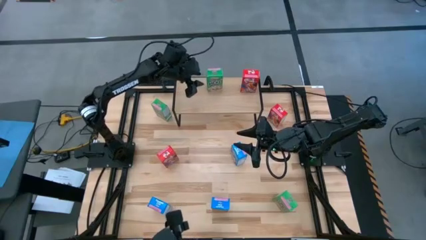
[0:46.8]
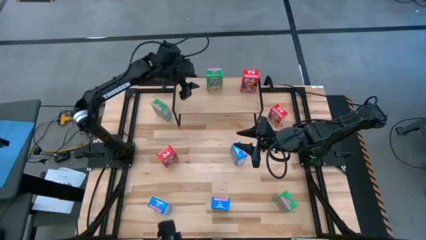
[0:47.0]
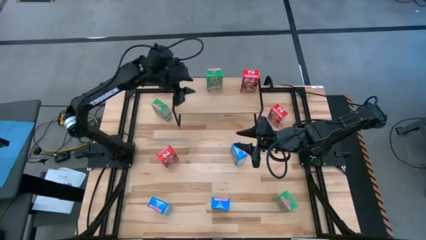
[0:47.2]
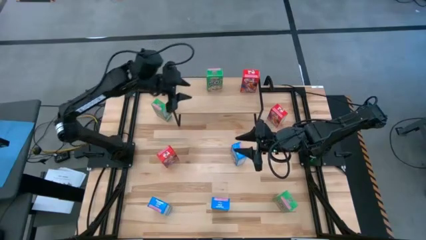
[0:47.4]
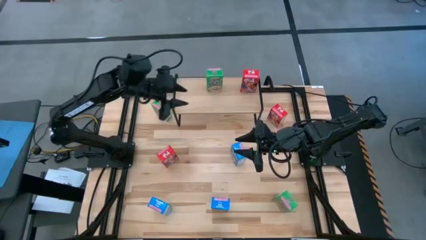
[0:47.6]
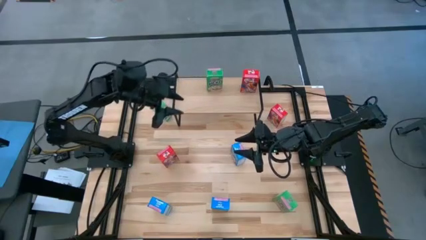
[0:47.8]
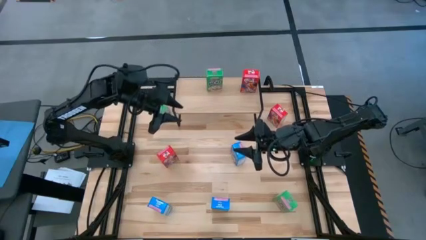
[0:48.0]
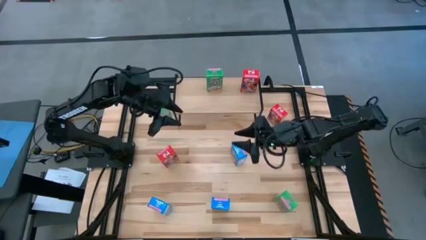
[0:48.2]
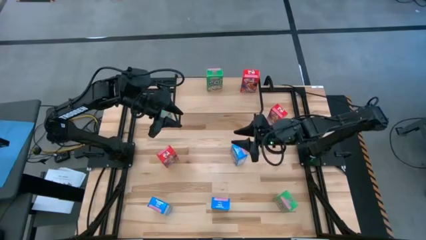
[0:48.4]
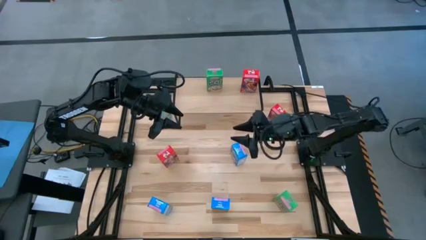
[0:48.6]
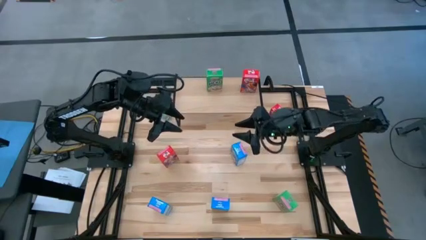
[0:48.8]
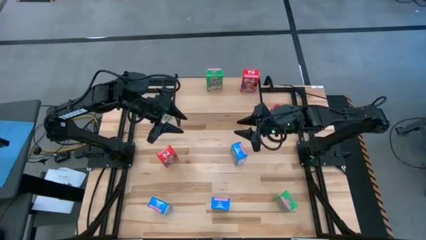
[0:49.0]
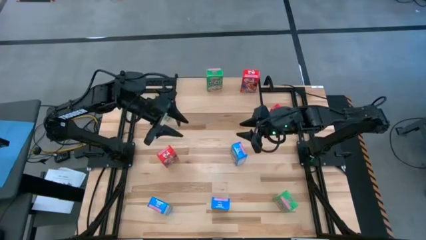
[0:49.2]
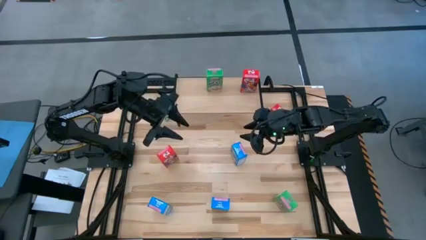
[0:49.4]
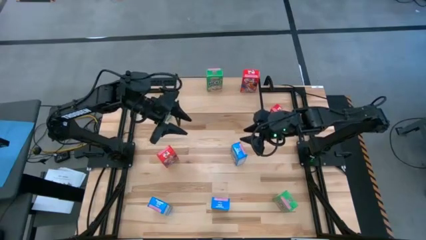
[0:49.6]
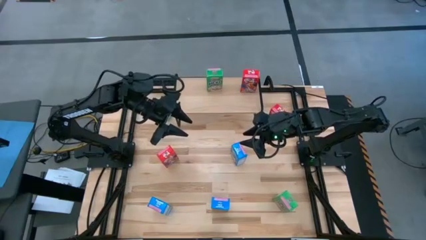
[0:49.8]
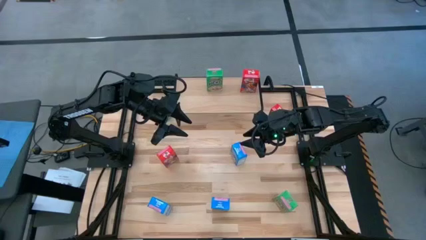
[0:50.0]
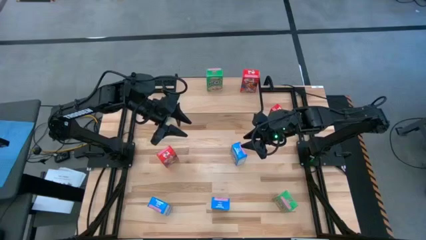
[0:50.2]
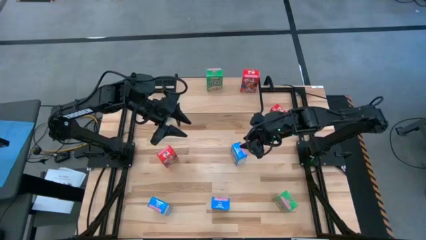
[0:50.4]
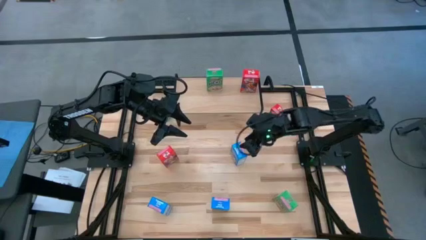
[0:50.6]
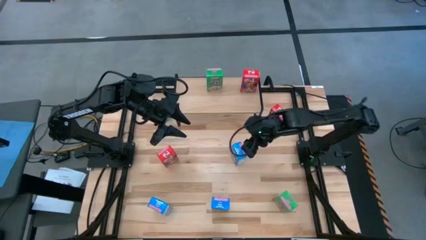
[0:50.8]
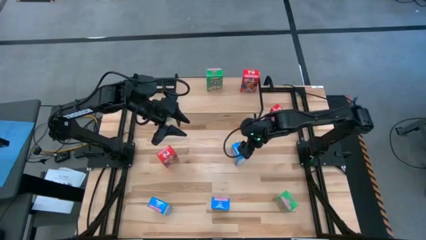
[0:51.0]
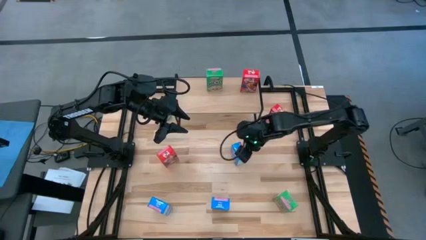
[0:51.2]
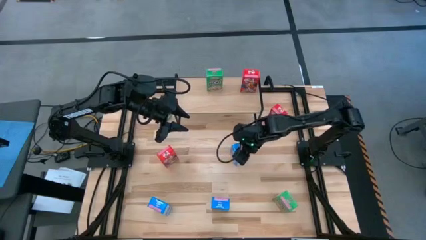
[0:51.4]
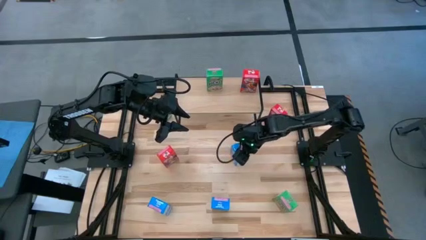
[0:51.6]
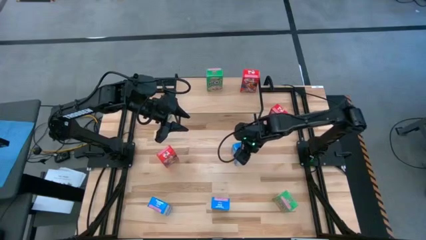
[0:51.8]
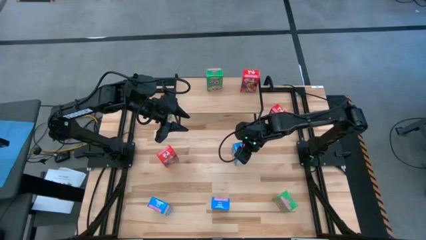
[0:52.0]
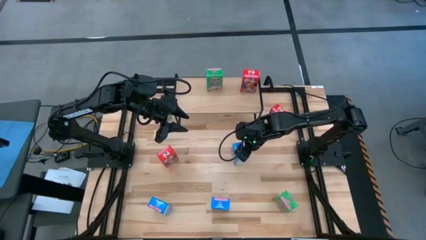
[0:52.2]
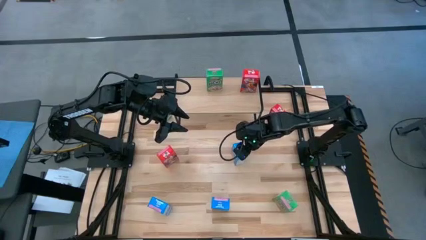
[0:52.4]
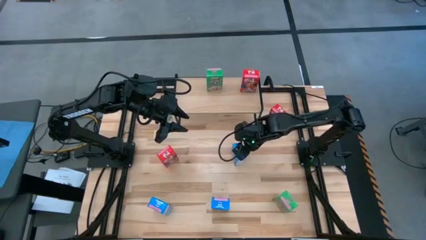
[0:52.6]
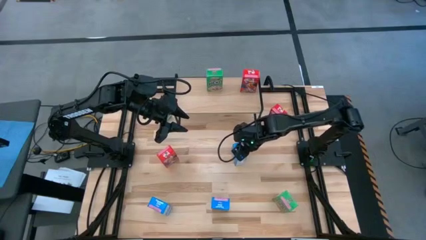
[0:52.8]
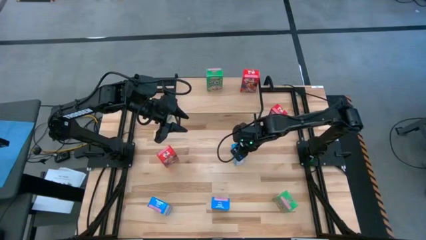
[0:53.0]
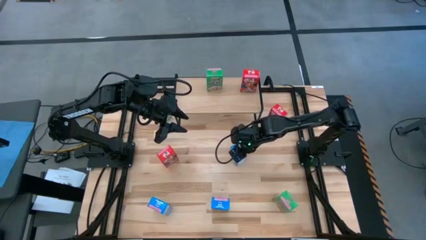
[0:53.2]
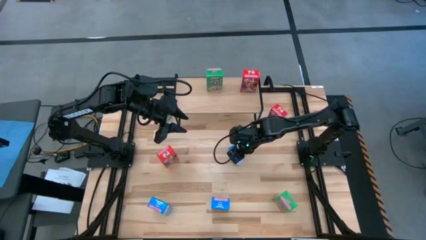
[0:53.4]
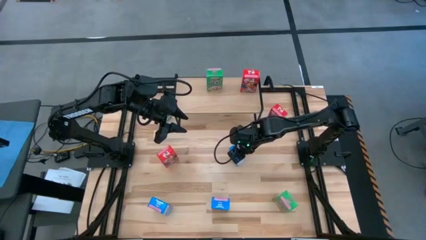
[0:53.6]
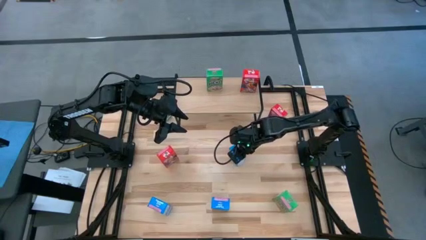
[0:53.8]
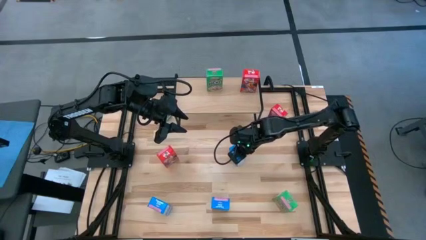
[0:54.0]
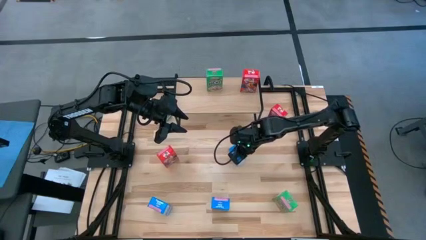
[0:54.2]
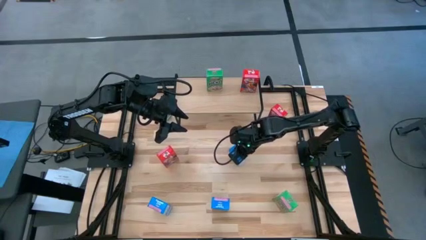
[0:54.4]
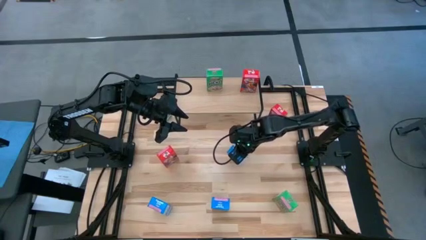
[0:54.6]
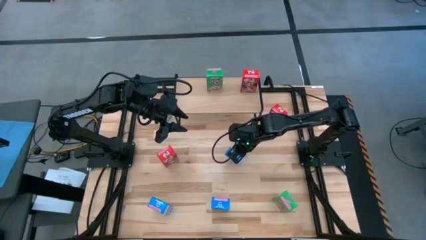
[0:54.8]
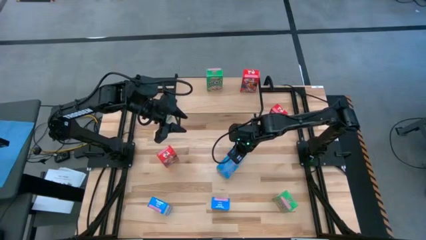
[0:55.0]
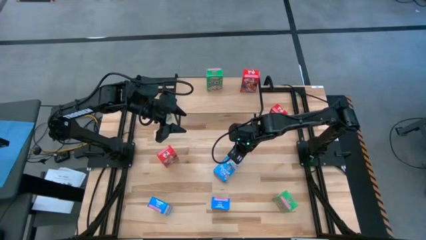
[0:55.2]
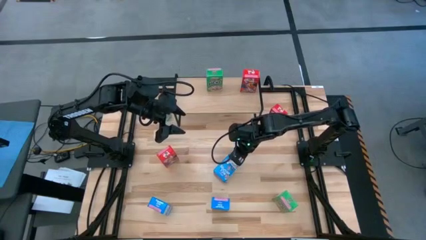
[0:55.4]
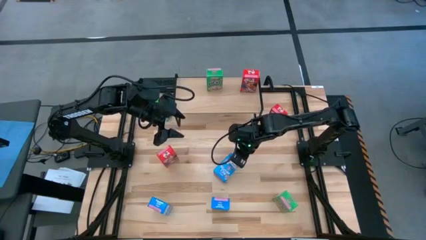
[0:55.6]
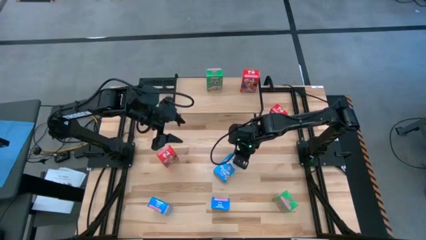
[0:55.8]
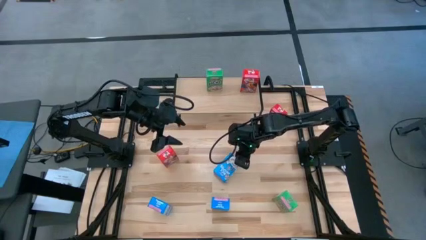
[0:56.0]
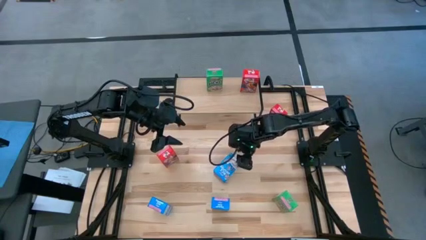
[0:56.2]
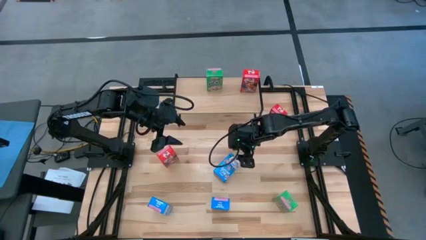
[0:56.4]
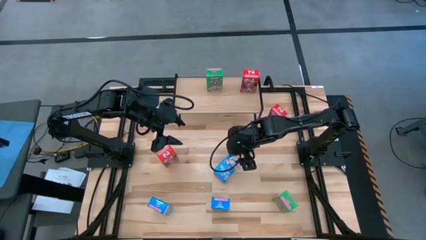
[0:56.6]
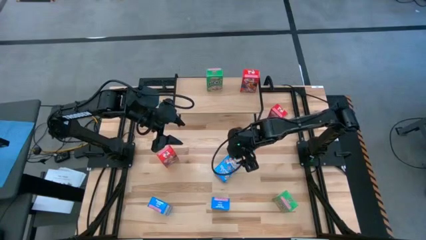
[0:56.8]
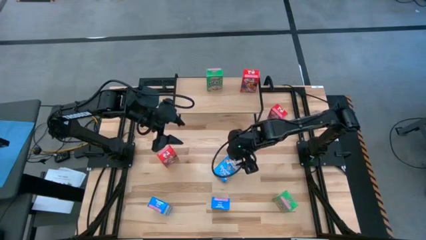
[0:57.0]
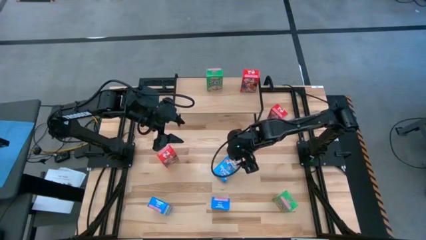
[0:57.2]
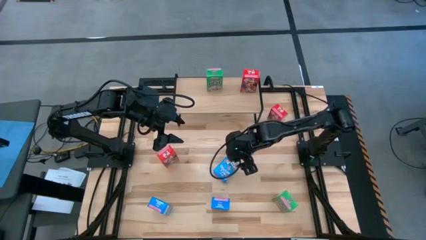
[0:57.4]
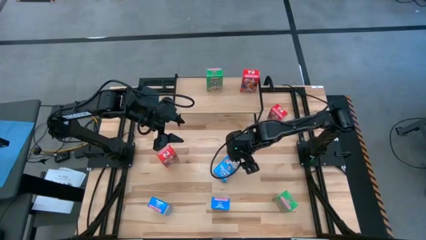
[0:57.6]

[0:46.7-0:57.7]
Task: Stack cereal on shelf
Put the top right blue cereal box on the shelf

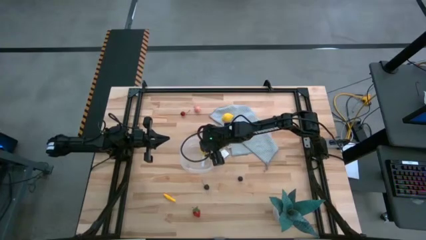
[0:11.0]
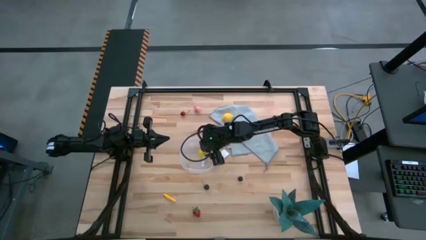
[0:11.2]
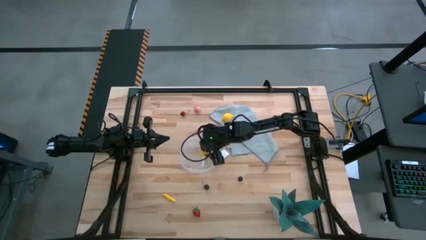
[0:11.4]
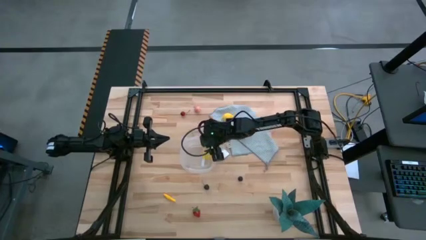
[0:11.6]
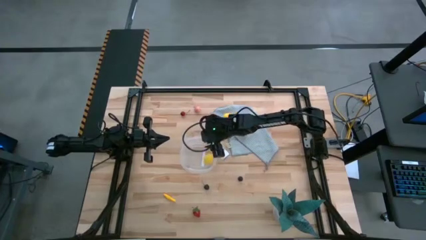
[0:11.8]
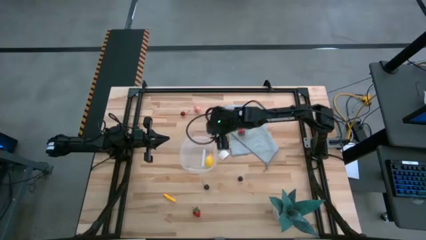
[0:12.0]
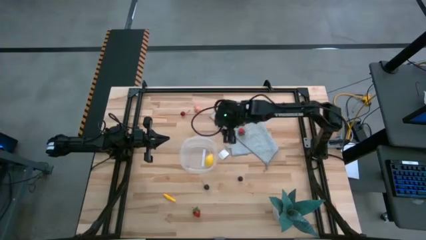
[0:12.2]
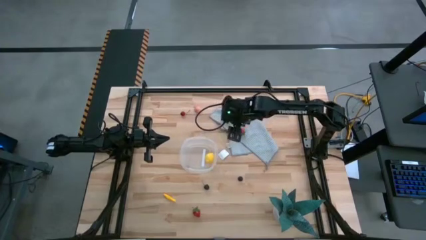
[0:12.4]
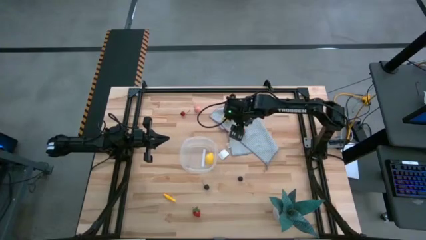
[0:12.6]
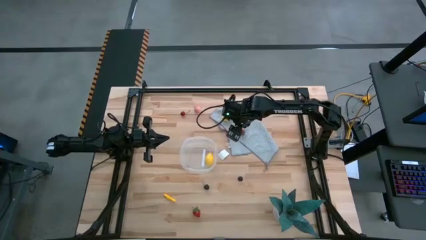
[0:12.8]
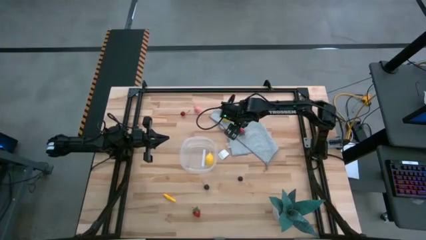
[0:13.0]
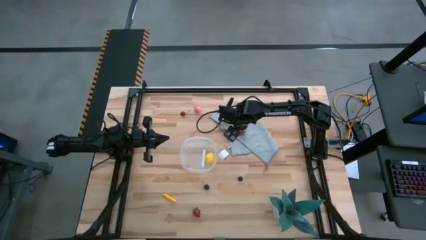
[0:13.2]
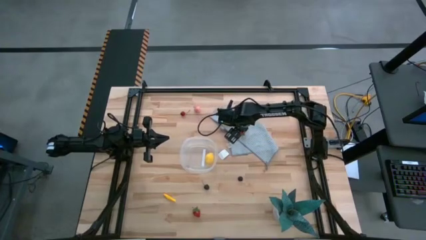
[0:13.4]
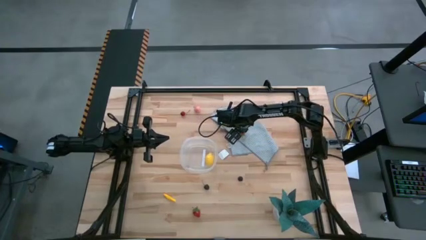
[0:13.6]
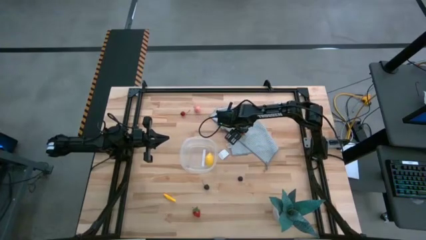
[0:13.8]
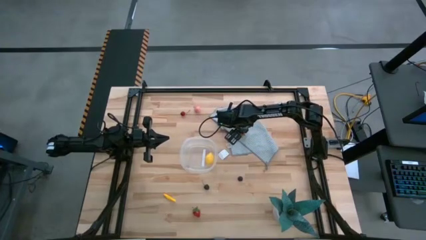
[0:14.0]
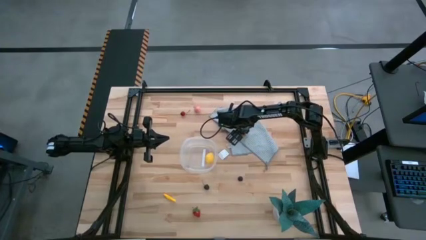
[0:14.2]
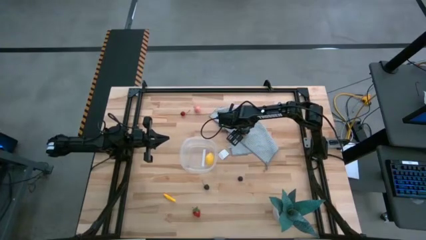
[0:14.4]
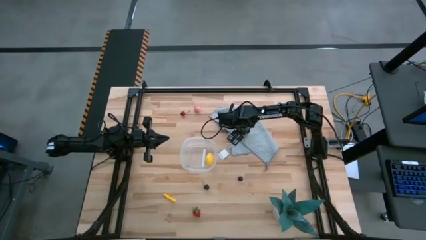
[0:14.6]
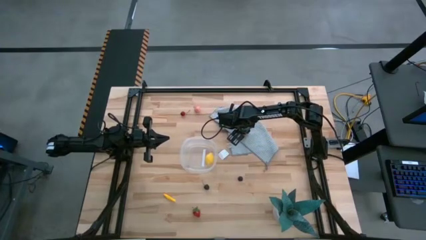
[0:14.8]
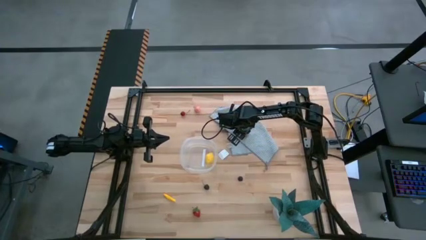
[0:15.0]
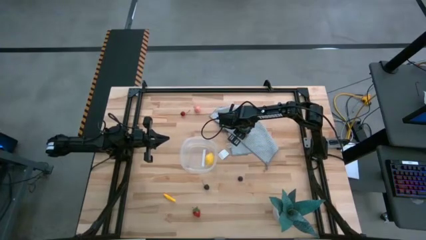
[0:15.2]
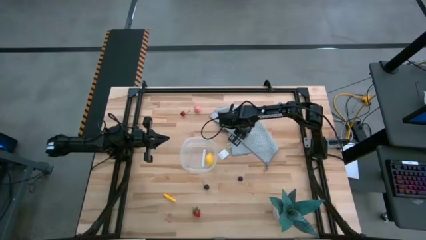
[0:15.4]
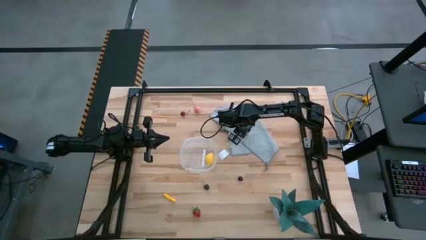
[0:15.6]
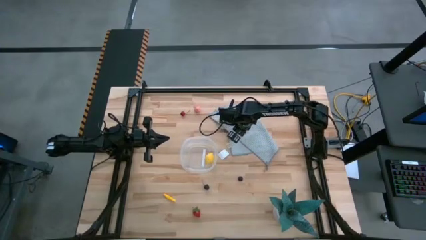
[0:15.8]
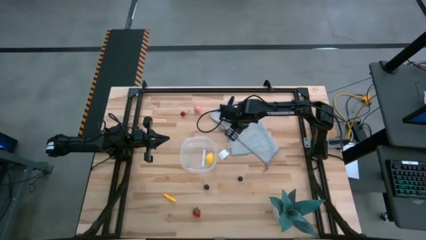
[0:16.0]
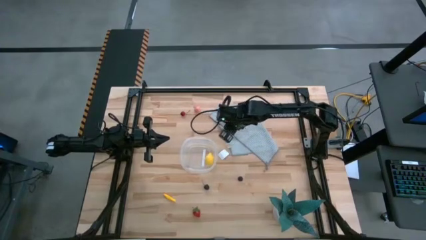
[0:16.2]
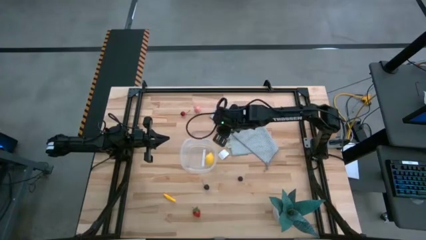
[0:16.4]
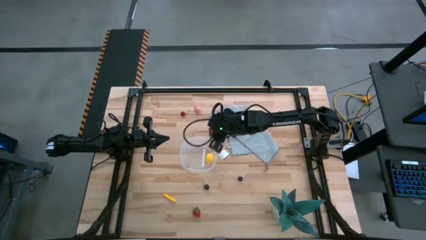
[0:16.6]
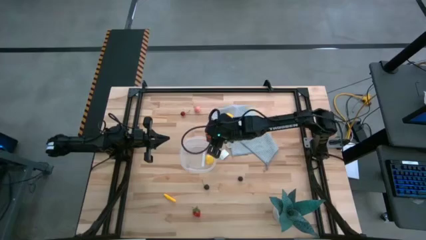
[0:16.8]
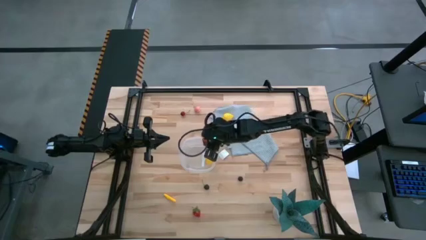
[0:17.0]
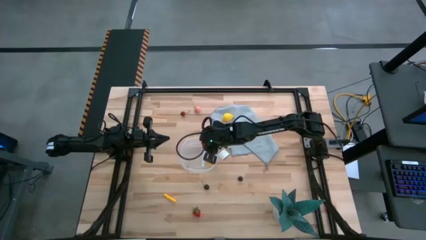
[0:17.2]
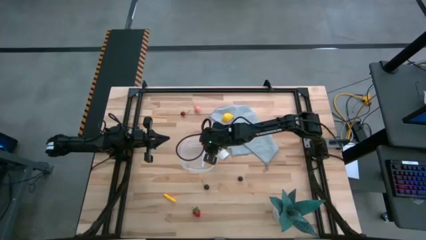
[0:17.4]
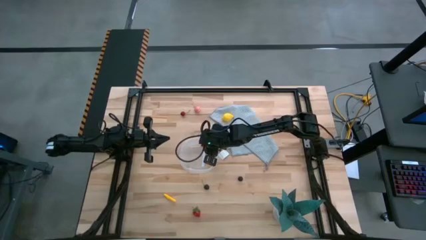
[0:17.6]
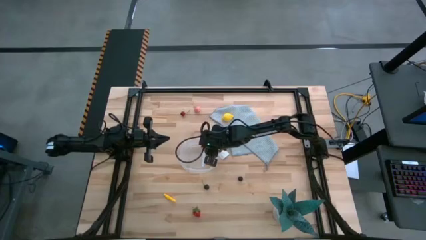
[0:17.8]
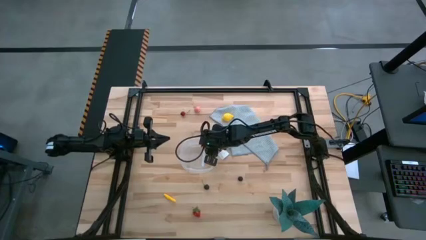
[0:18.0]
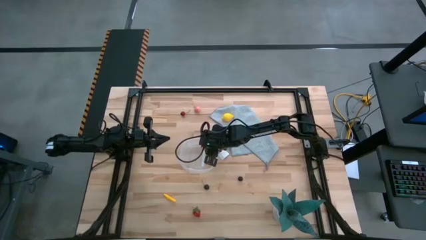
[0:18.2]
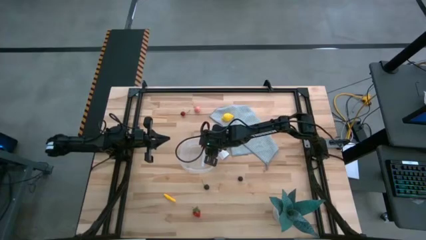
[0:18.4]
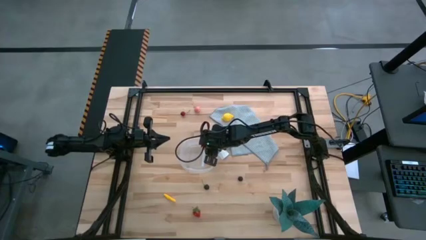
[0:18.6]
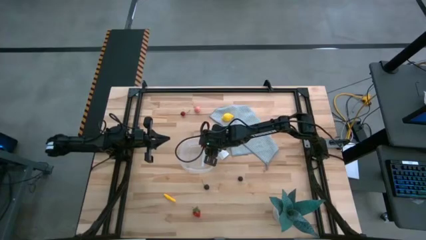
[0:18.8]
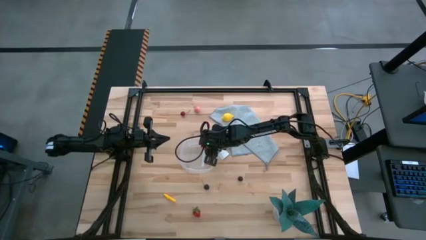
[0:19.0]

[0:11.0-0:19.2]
Task: Pick and placing Produce into tupperware
Put the top red strawberry into the transparent bin
